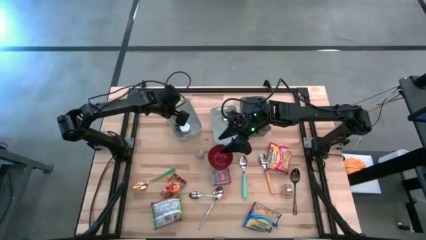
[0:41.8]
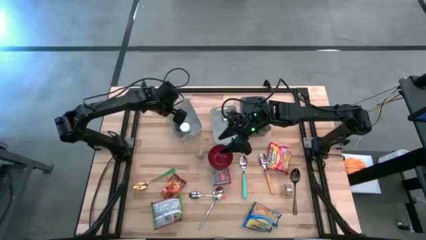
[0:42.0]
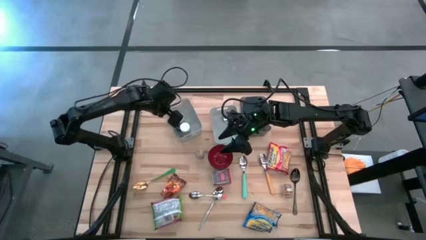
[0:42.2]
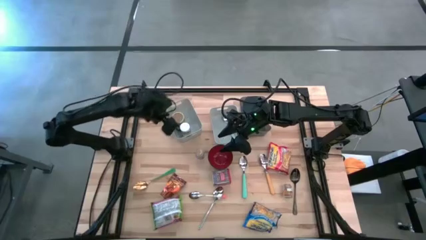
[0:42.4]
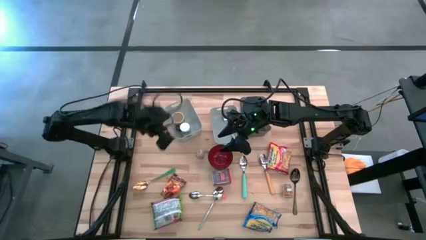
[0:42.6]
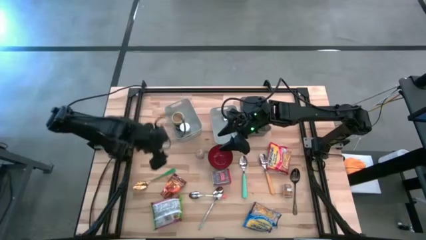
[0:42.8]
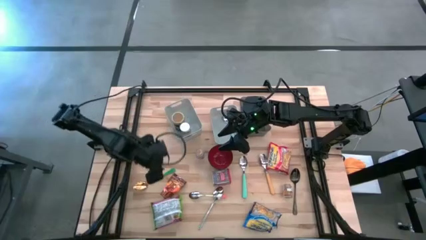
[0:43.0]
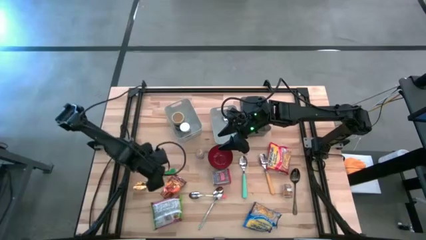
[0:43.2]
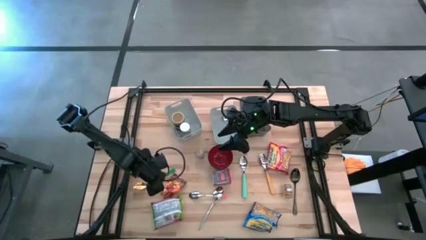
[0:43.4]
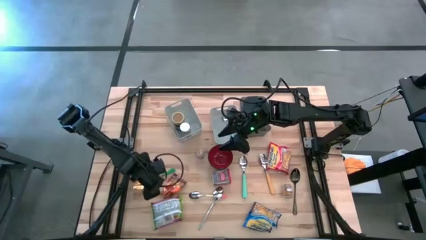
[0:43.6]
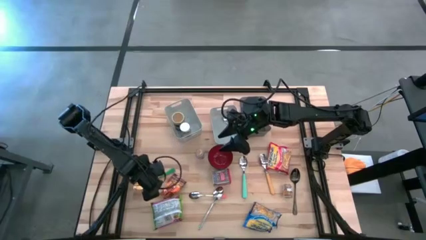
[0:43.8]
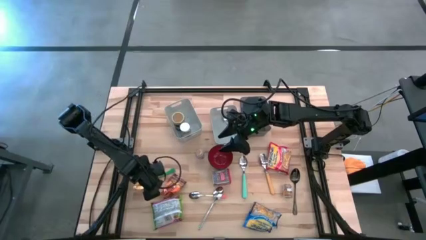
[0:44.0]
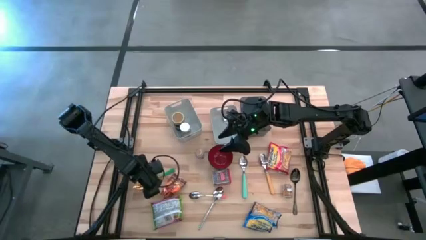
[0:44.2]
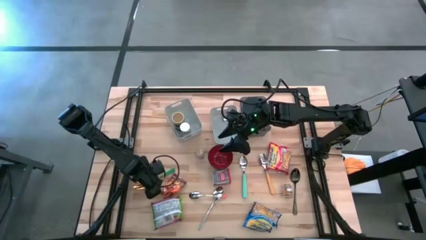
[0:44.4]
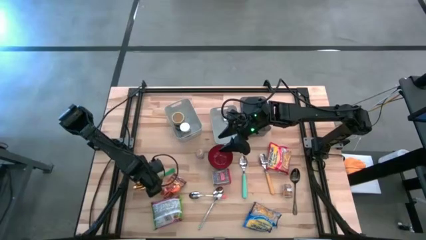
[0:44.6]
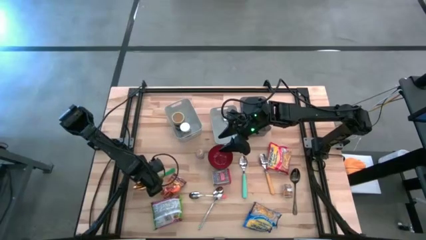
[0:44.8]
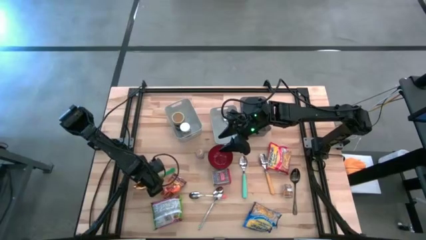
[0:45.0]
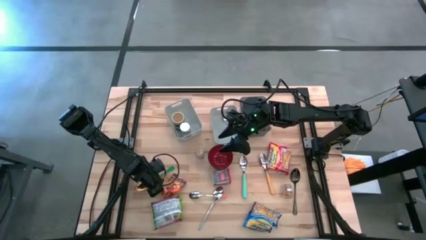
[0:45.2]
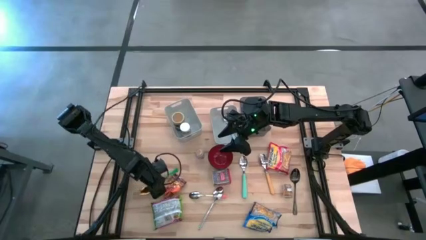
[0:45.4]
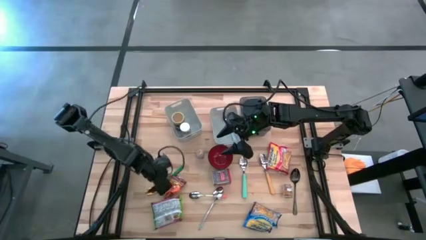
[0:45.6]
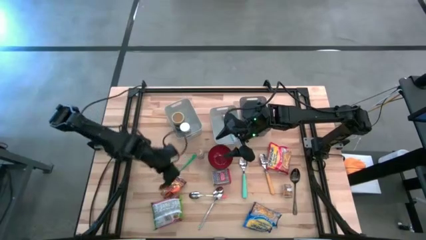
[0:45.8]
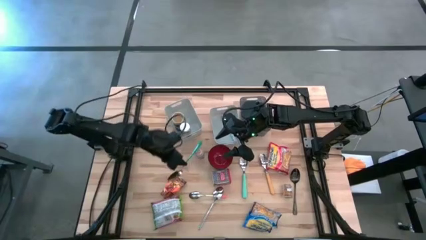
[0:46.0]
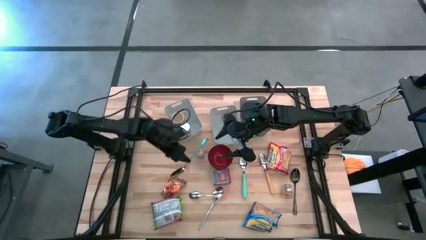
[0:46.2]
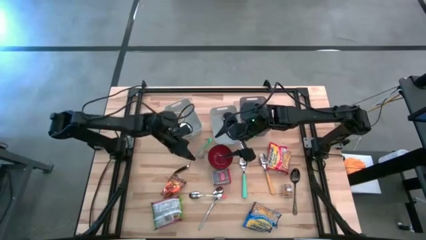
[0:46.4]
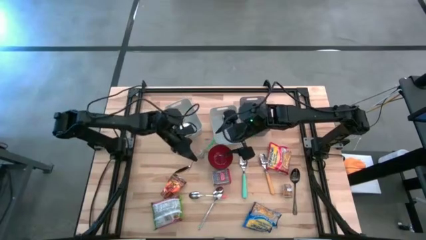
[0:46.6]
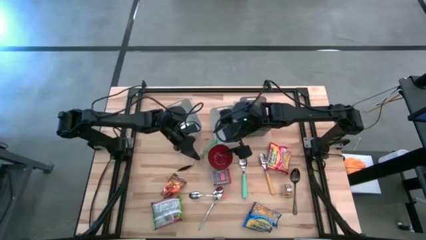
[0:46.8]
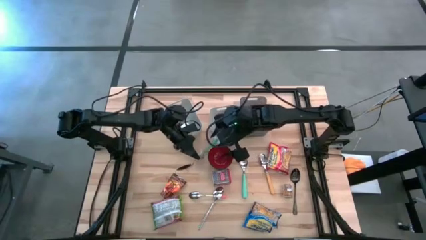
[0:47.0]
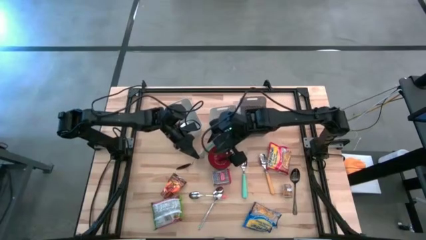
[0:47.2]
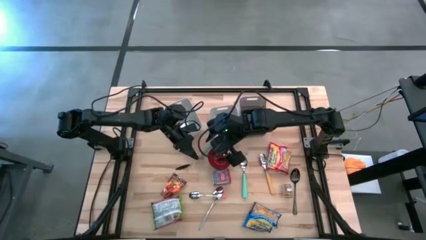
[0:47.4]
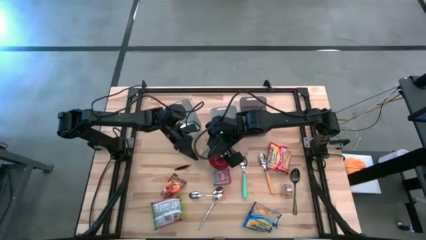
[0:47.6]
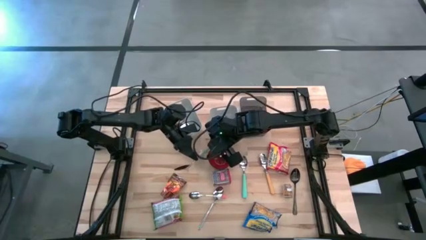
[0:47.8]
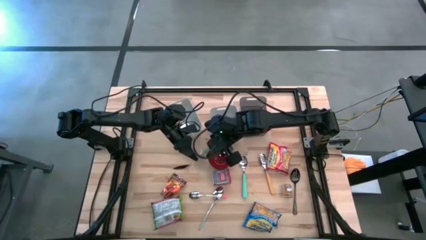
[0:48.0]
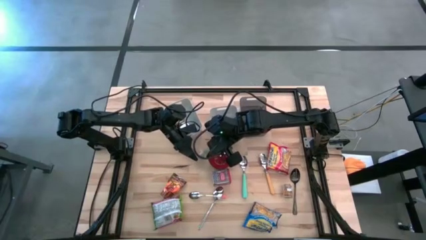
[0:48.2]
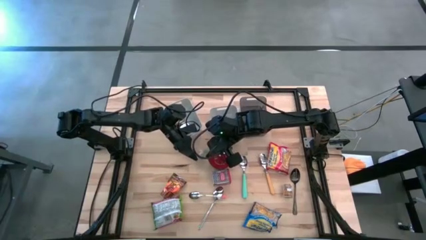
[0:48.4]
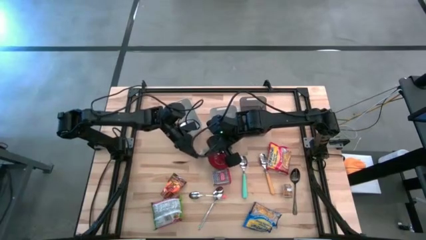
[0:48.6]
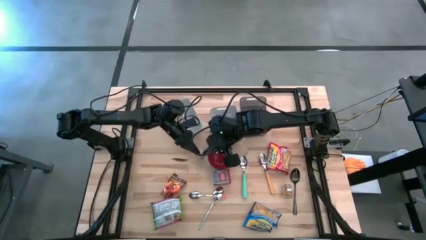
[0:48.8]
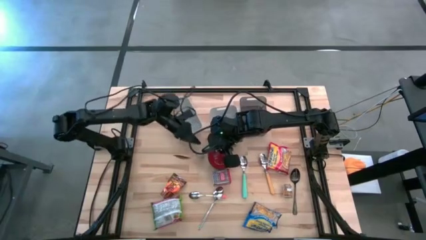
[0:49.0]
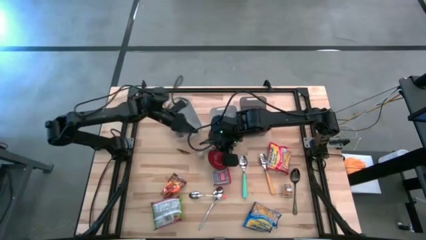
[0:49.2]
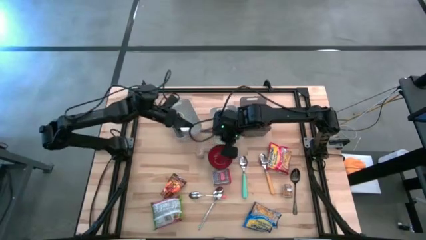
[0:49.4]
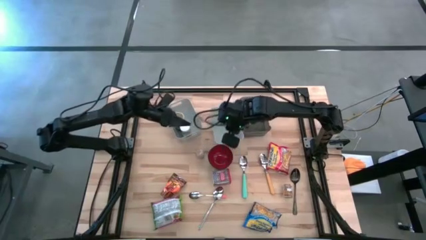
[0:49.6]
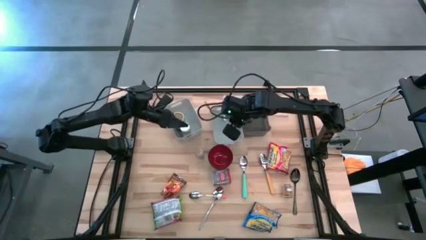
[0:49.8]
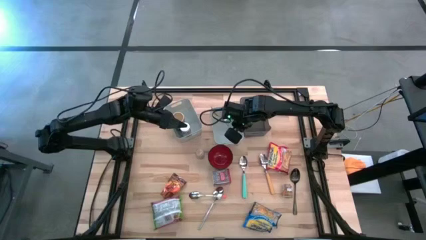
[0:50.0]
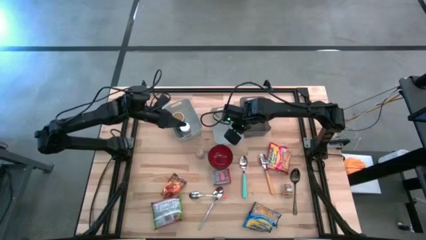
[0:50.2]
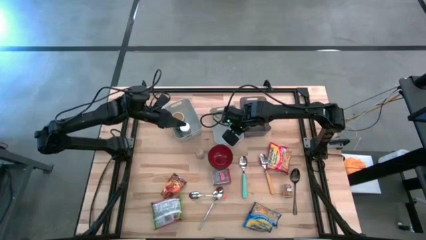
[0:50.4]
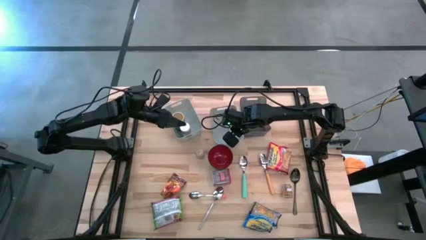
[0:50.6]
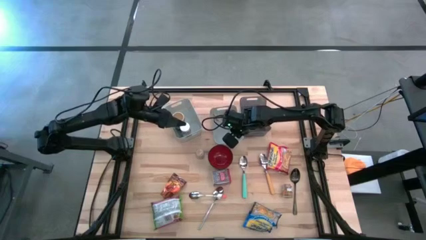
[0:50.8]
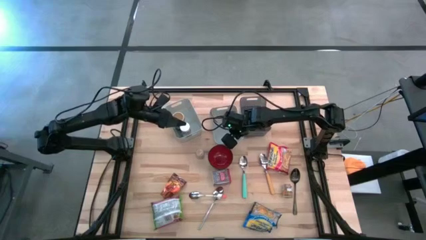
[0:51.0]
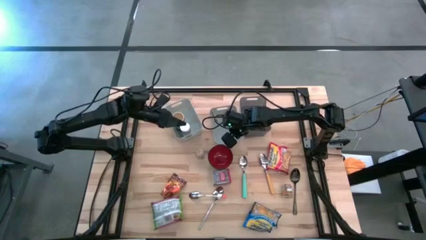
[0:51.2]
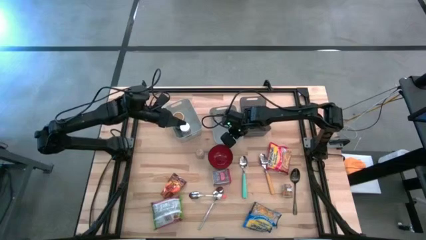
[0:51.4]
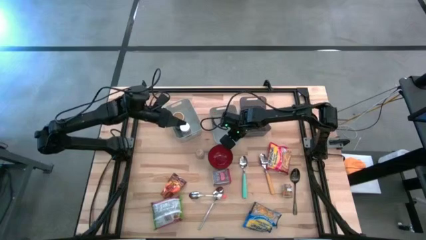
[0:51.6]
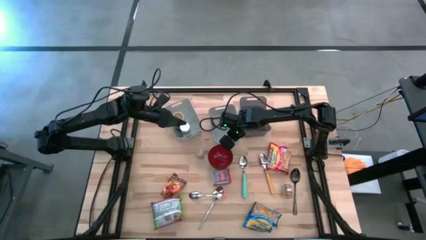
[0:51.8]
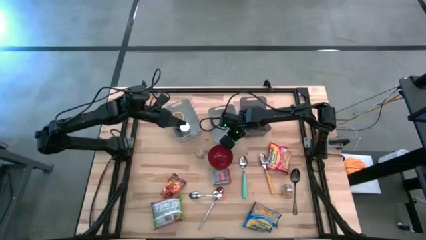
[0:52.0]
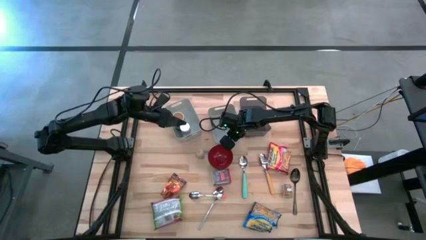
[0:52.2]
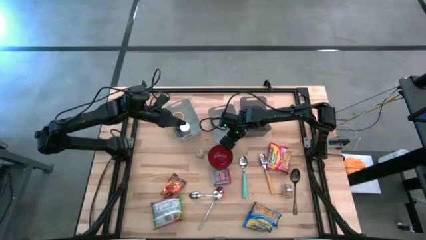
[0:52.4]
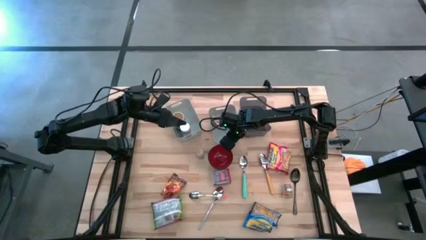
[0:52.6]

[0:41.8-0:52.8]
Put the green spoon into the right white bin

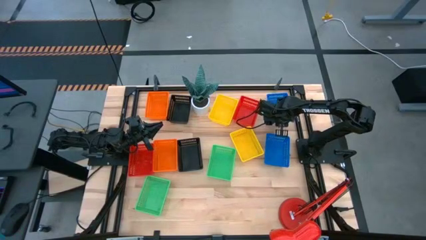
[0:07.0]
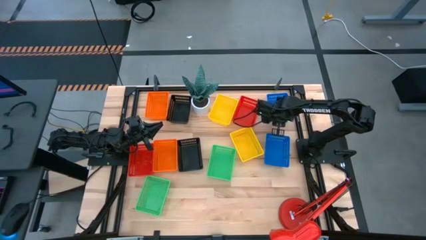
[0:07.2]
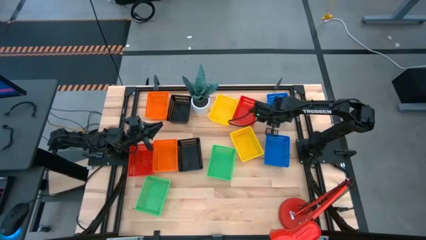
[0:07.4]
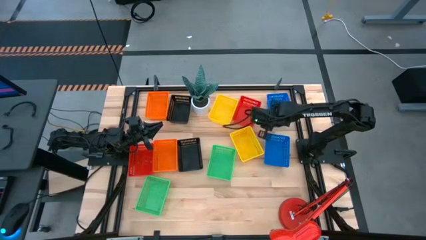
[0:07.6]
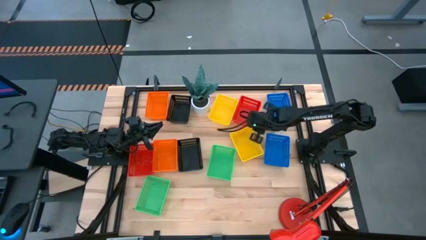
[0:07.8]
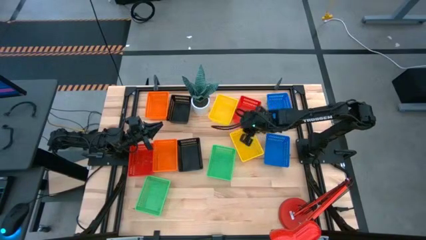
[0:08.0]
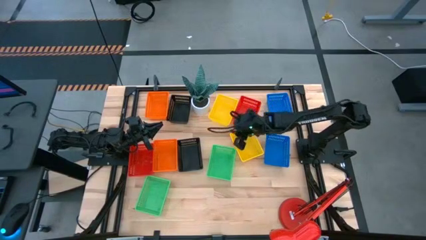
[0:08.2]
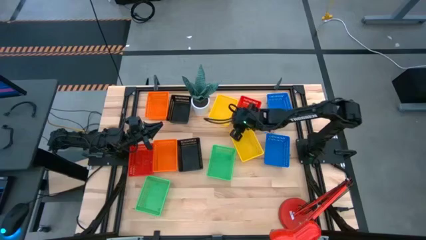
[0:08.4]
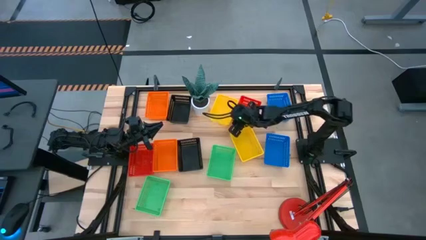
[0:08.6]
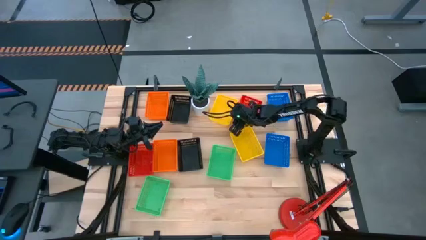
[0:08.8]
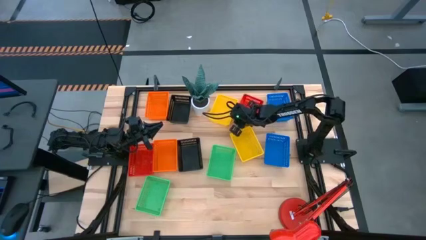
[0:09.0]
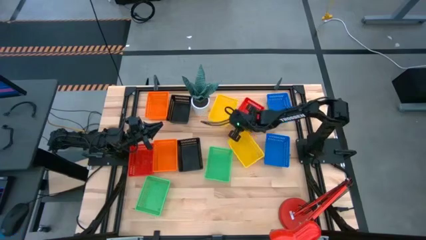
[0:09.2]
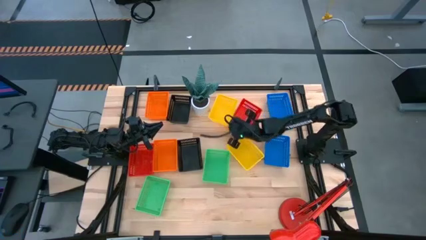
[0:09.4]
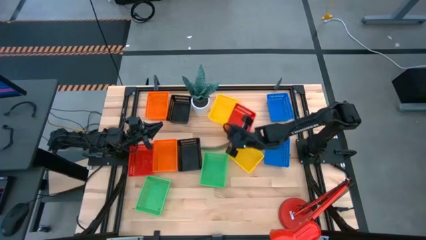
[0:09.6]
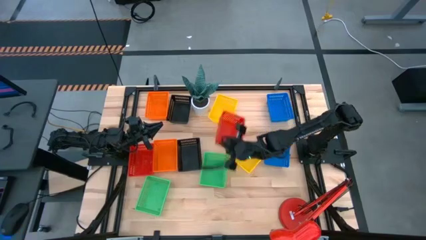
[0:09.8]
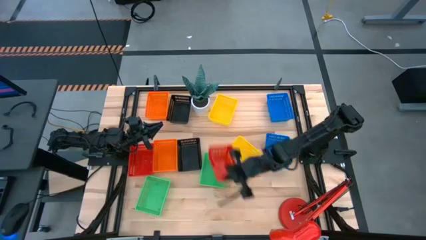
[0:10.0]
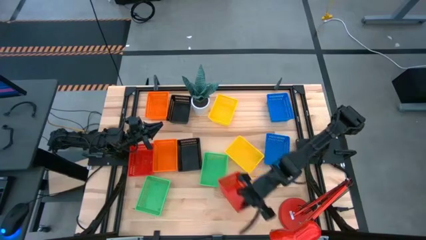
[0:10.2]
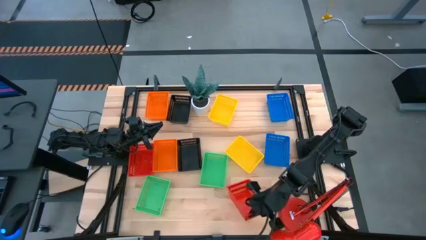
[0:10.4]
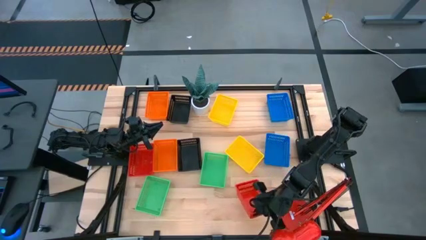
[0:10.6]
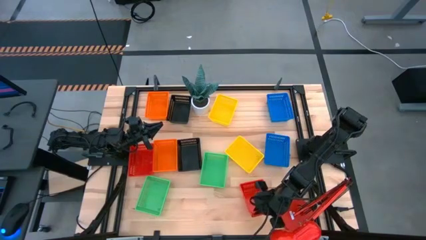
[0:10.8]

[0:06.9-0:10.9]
Move the top red bin to the bottom right of the table

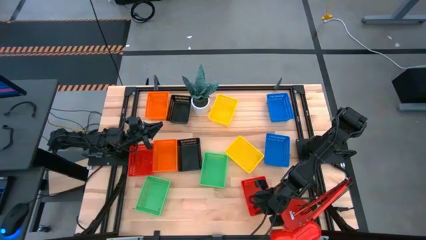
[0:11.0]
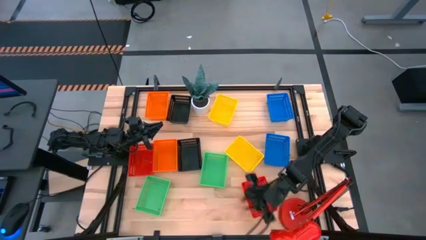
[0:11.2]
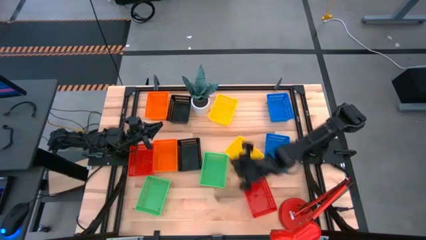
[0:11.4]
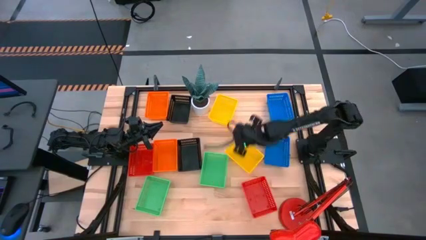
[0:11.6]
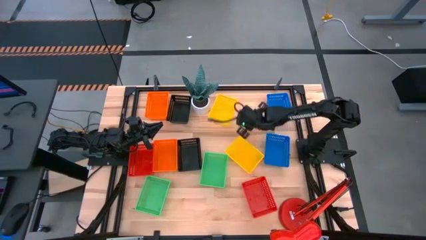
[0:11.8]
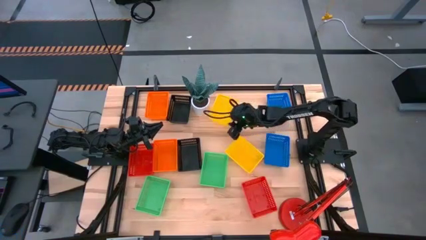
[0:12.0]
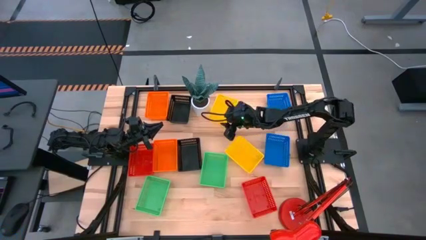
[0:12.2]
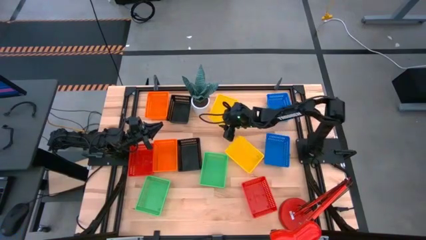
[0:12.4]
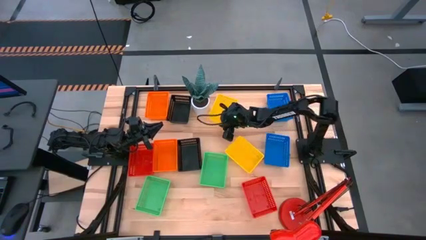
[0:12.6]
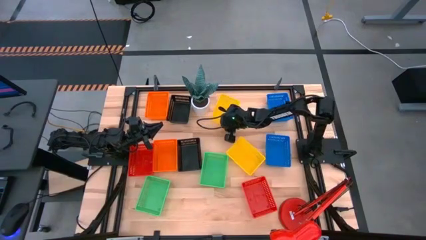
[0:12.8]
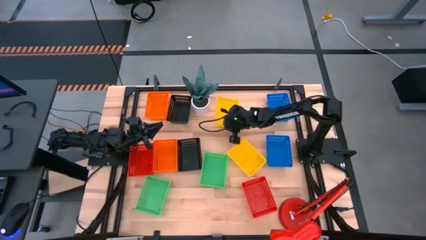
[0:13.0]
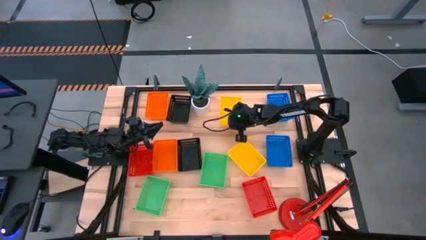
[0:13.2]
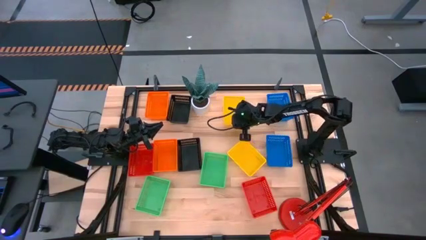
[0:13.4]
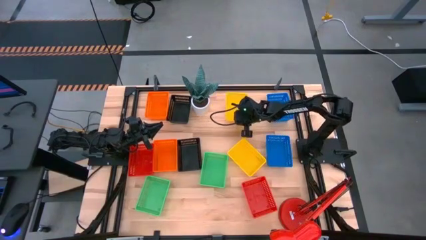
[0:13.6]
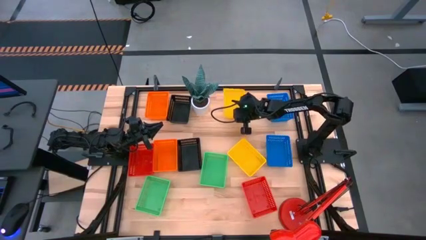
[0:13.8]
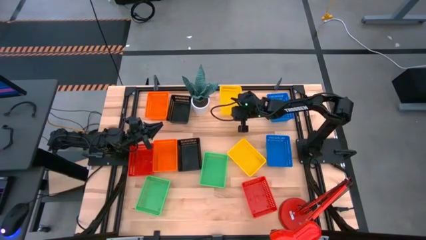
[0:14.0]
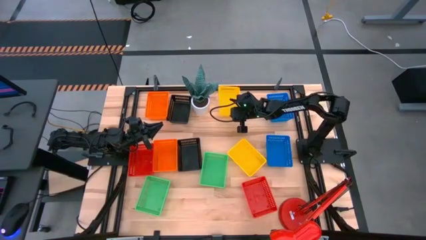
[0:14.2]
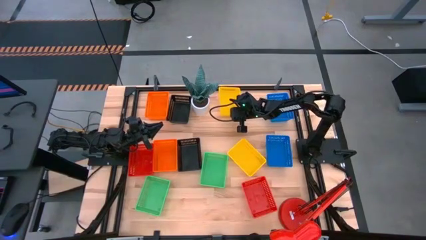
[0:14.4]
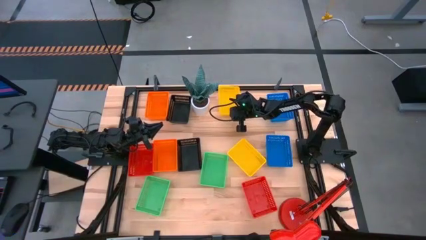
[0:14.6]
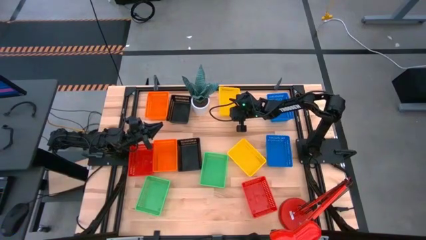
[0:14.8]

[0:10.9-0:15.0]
Adjust the top yellow bin
